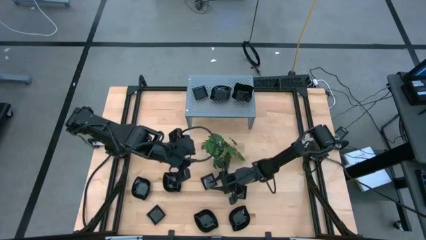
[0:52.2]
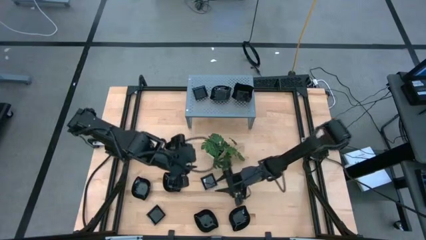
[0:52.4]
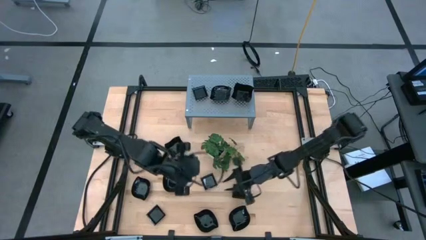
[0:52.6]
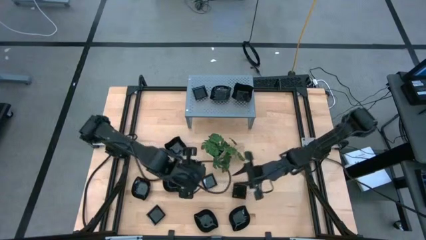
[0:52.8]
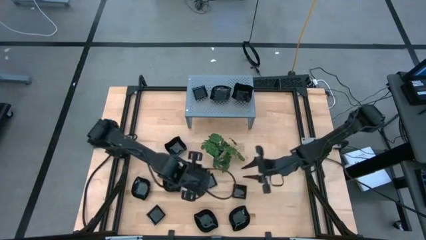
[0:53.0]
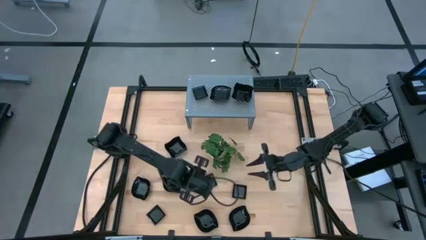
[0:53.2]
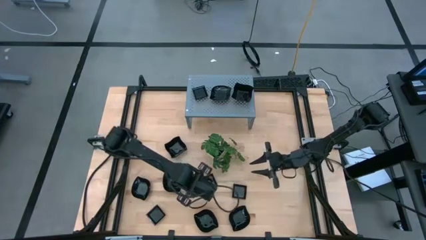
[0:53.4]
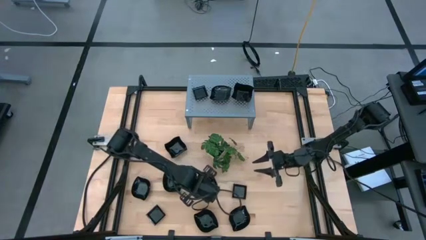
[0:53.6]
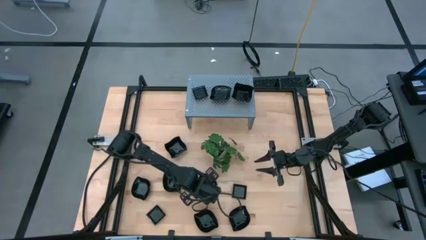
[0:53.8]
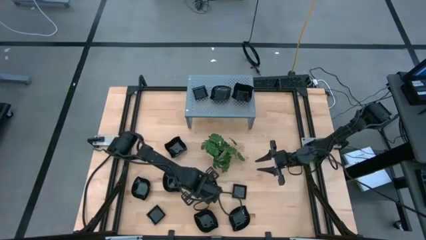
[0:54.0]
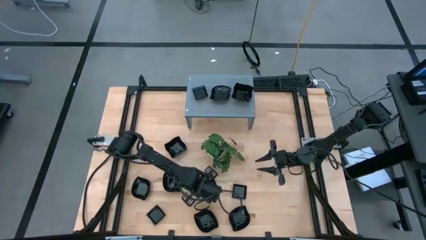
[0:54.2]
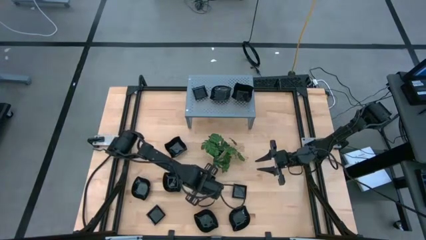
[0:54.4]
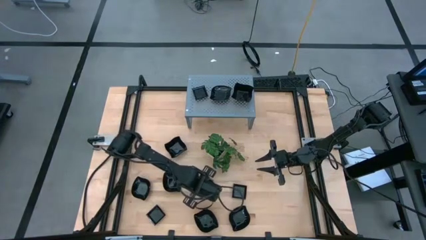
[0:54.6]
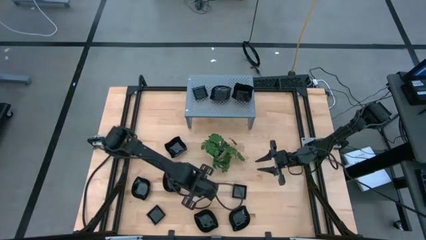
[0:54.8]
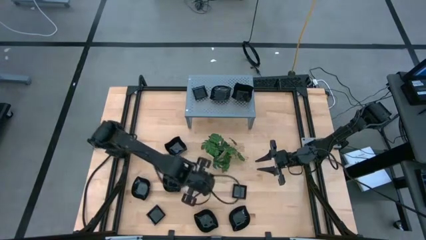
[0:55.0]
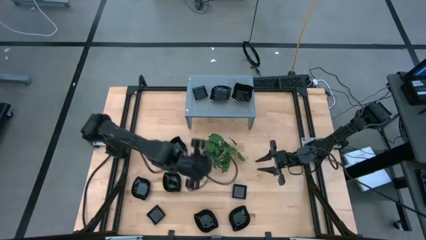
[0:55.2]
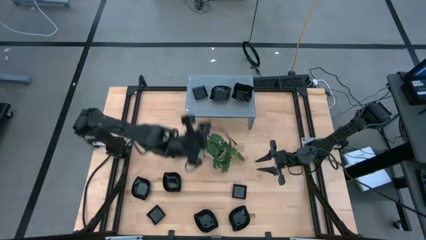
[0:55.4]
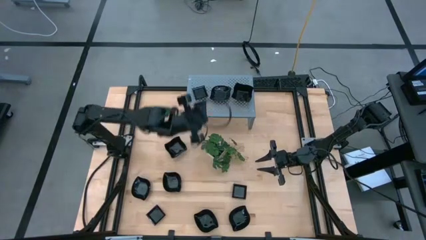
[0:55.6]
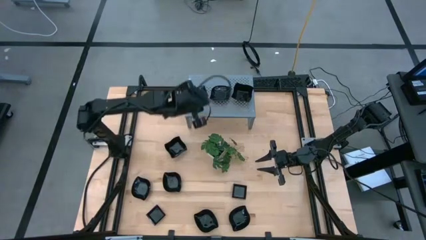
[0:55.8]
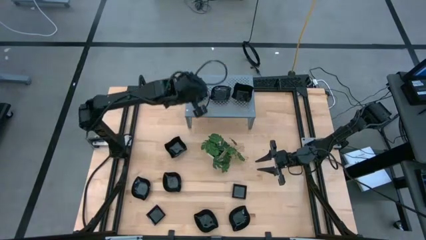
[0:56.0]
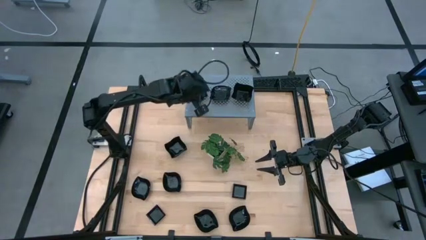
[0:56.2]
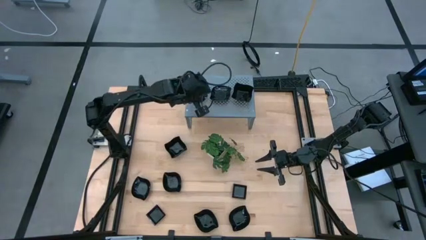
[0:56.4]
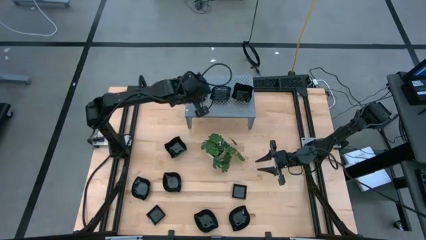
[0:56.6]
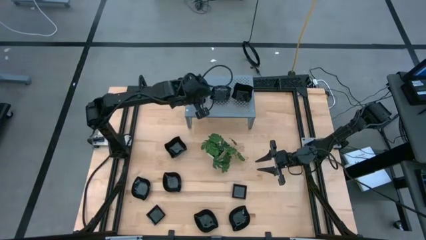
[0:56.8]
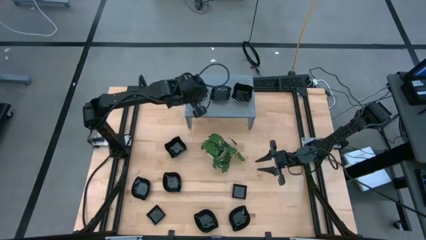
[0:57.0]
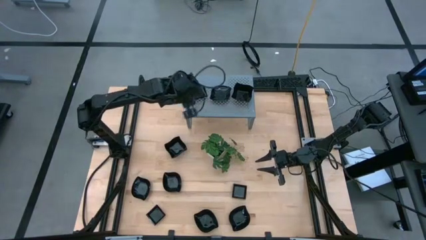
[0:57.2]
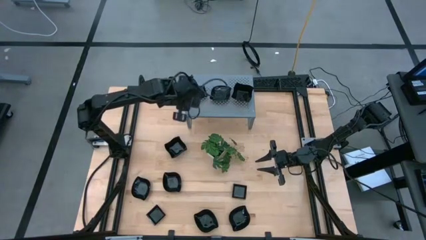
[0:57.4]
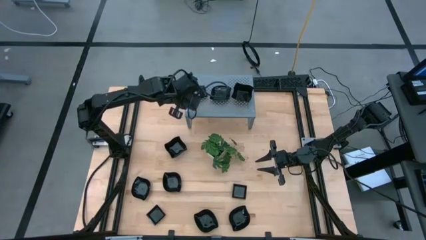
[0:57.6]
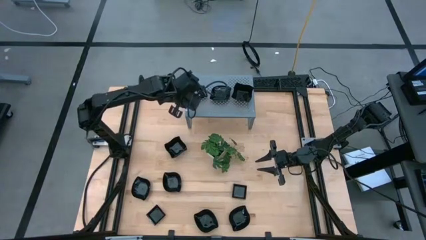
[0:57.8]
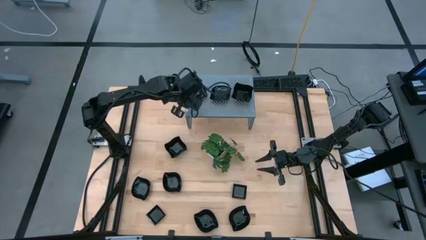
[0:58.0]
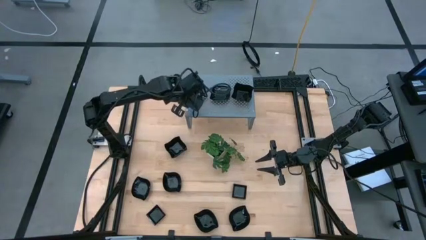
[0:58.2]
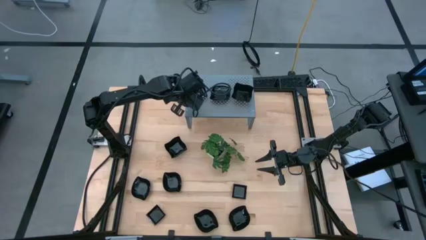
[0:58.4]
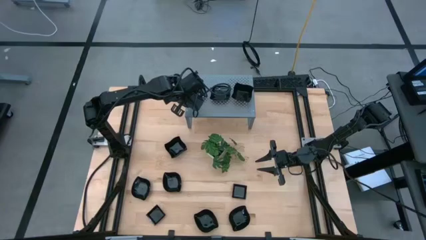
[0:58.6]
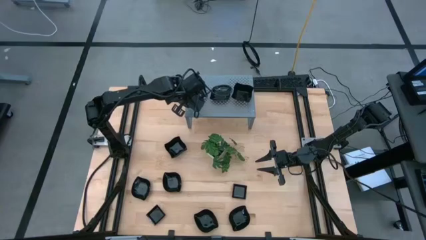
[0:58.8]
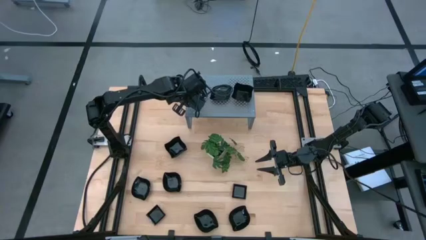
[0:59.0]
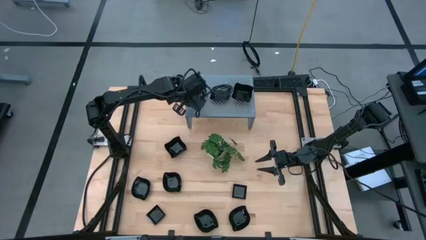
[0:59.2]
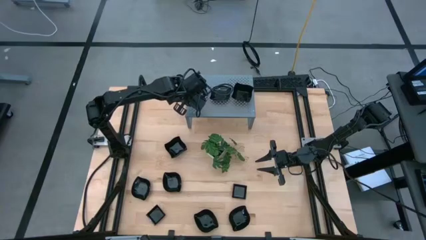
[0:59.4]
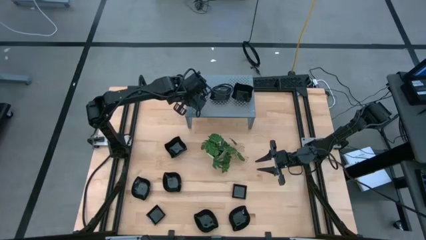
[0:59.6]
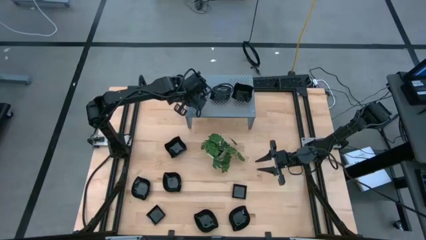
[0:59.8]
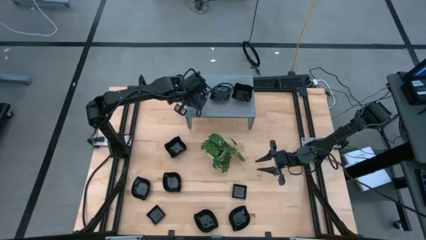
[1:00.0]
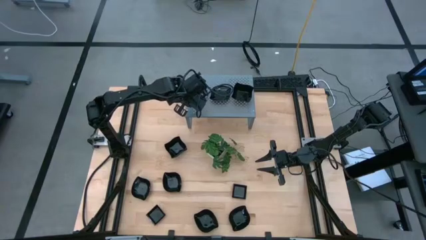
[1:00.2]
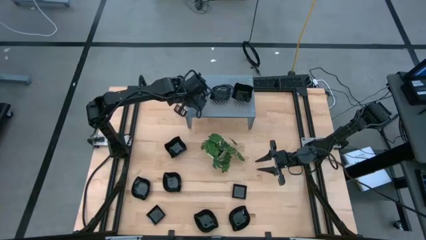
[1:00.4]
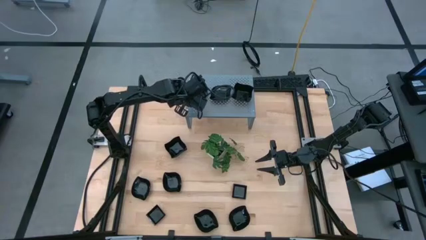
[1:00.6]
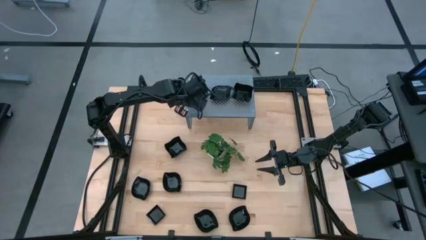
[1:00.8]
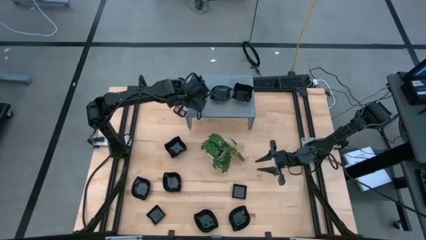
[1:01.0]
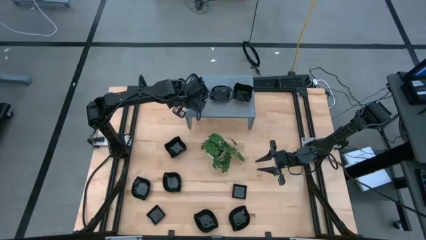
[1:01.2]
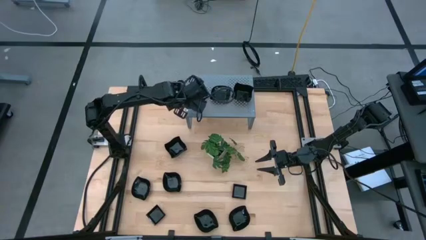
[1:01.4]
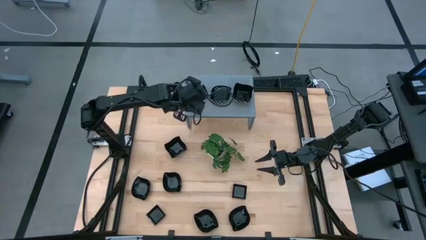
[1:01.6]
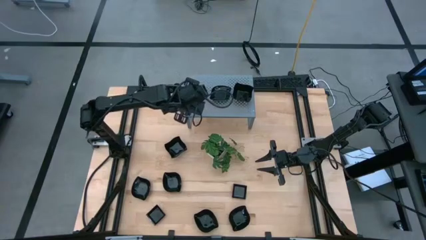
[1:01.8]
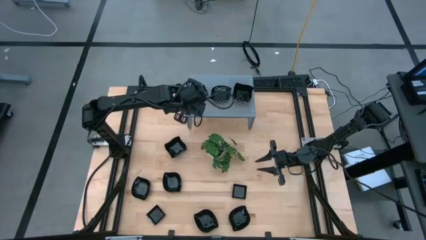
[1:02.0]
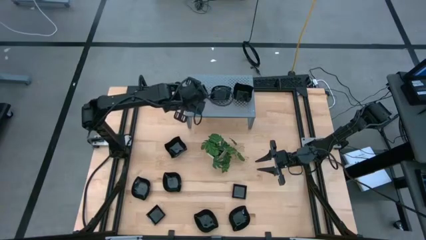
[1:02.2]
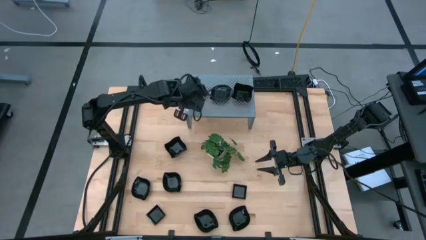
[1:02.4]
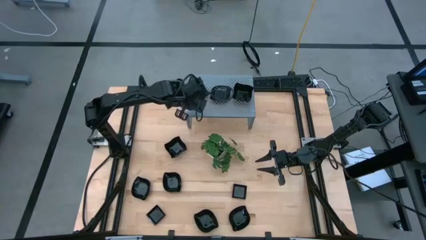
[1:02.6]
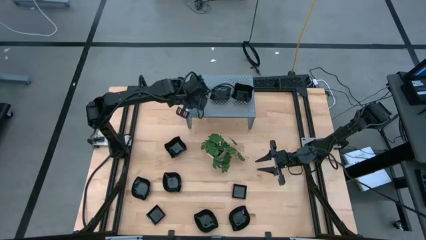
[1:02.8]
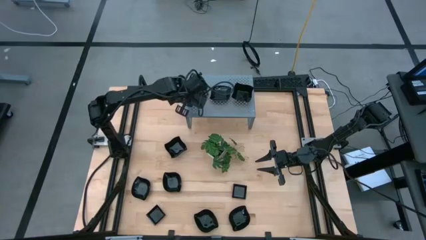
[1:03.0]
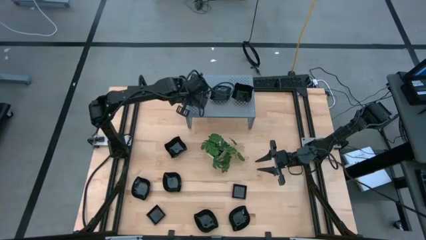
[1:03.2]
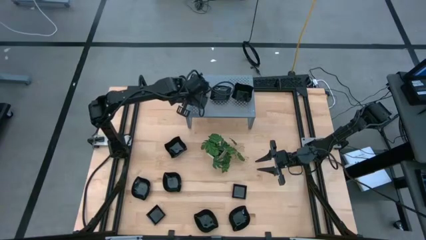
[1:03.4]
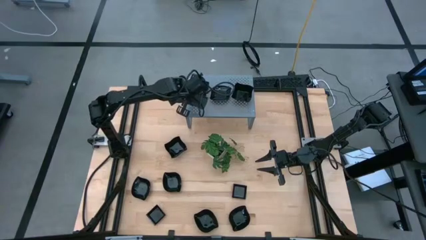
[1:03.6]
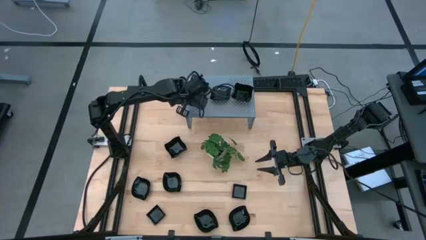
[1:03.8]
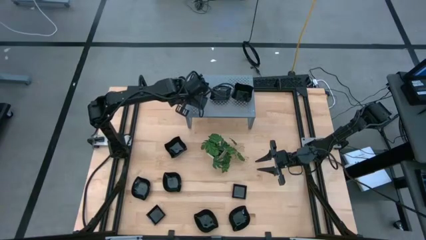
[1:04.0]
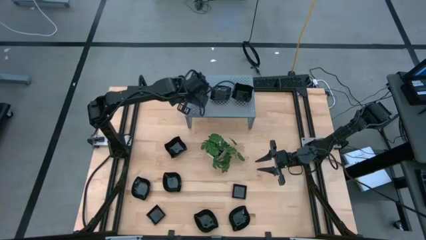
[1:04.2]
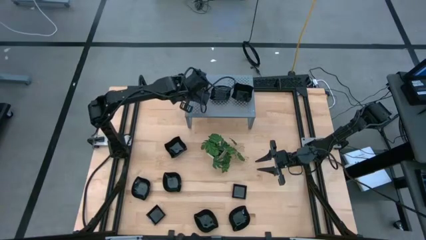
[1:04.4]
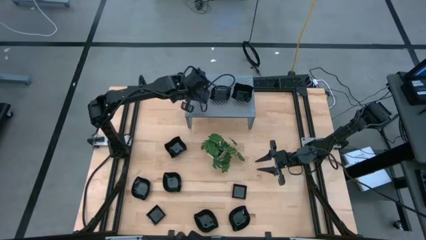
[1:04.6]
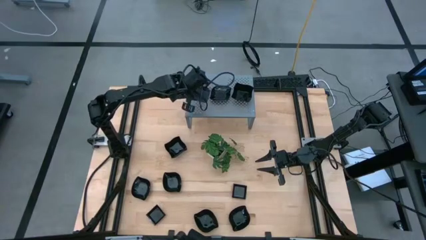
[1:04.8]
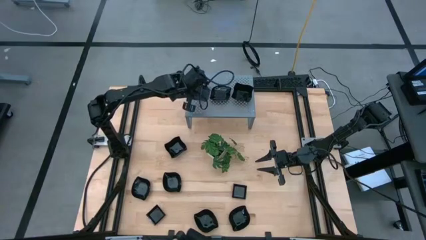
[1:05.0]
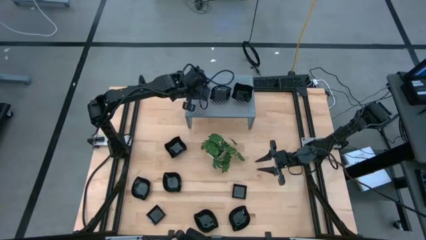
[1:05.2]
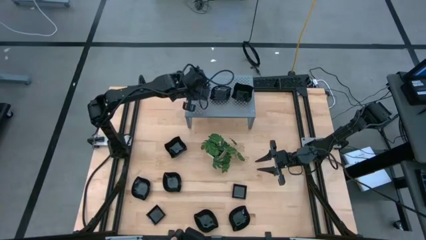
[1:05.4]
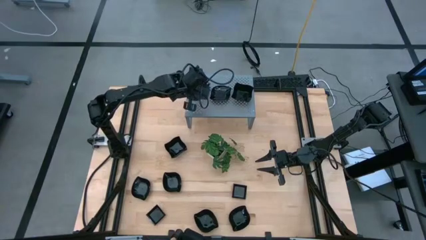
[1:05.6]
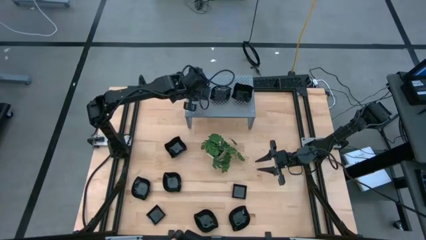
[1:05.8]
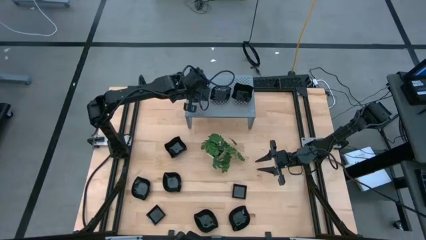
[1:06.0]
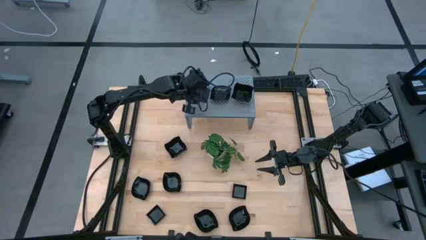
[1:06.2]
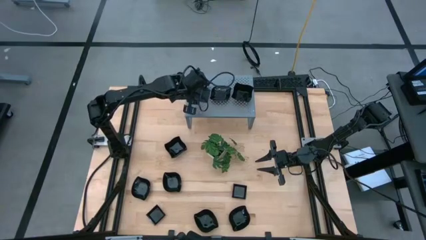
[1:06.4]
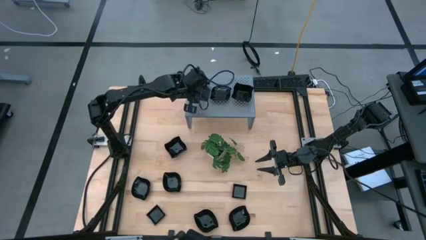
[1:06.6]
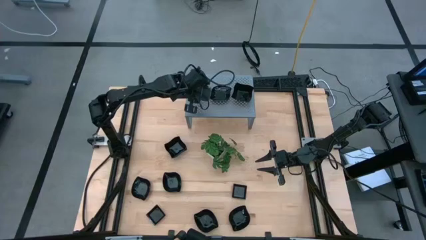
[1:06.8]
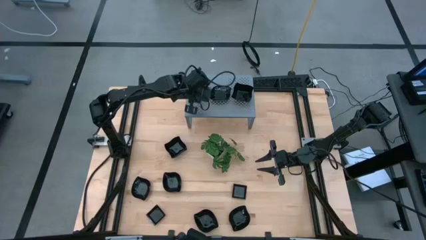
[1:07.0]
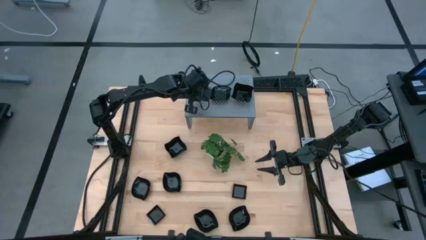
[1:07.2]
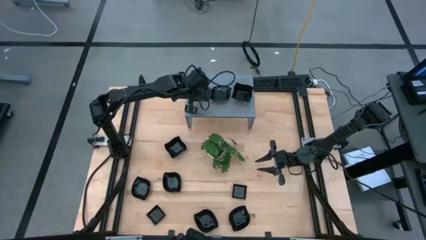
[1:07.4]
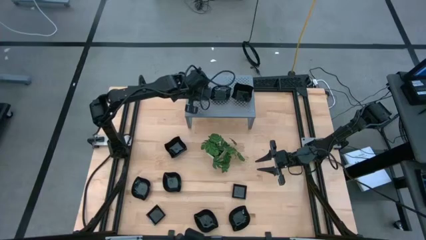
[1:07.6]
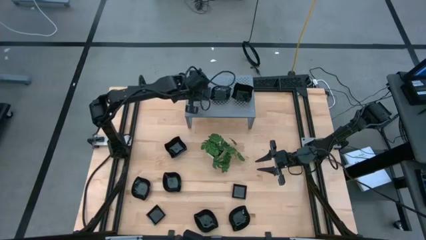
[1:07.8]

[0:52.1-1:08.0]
Task: Pick & Place Mini shaped plates
Stack the square black bowl on top of the other square black bowls on the shelf

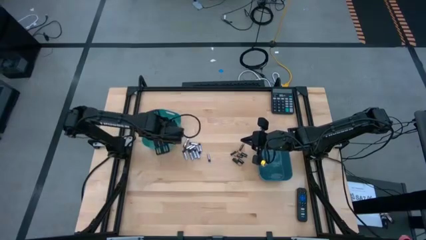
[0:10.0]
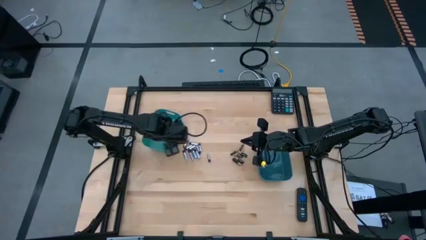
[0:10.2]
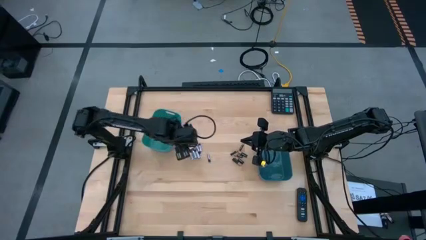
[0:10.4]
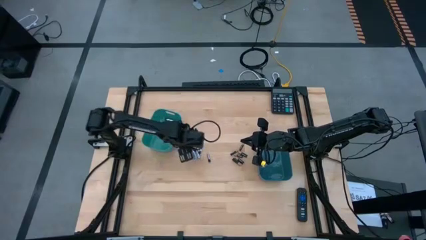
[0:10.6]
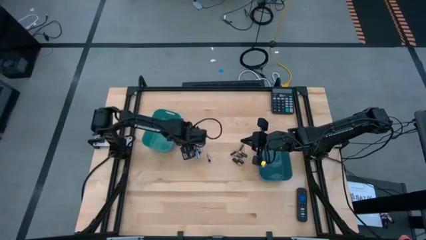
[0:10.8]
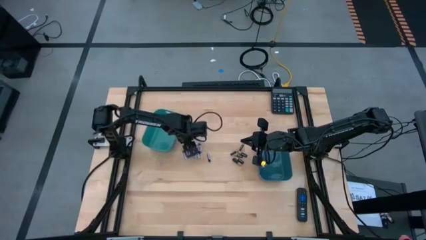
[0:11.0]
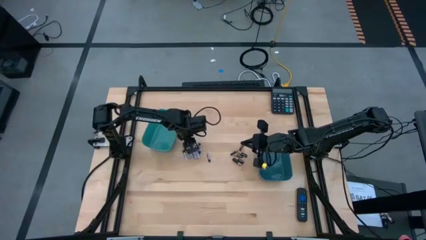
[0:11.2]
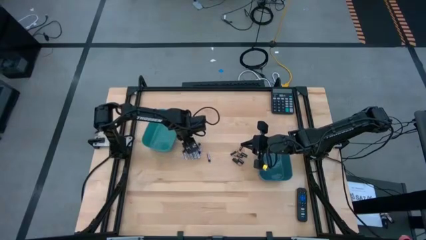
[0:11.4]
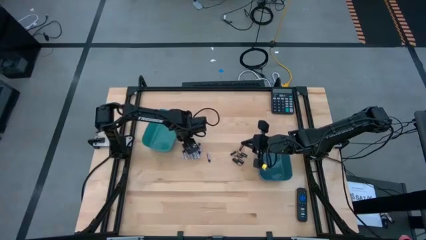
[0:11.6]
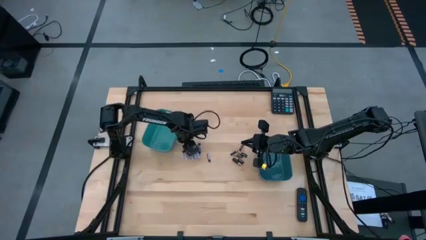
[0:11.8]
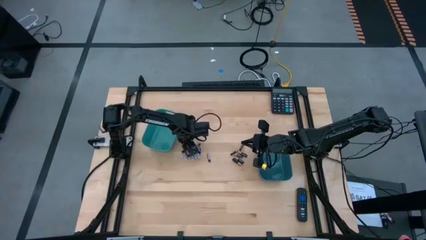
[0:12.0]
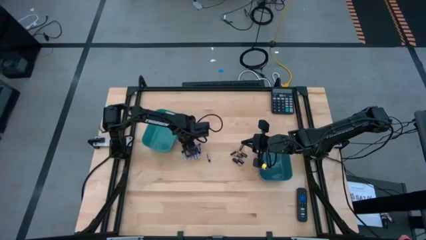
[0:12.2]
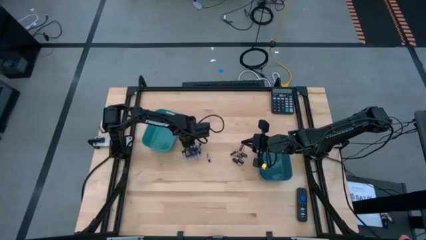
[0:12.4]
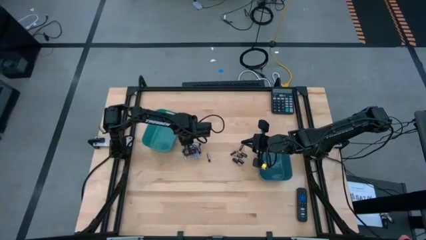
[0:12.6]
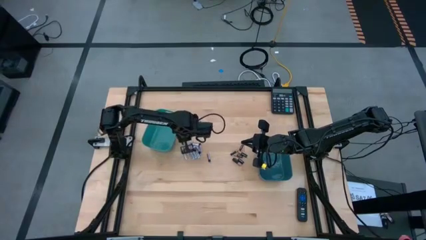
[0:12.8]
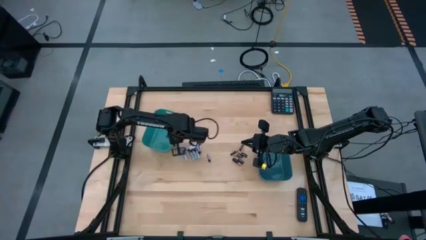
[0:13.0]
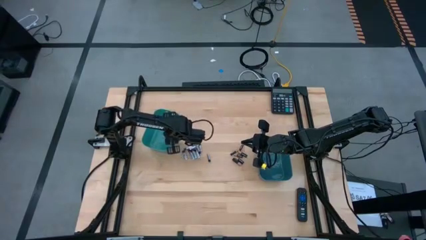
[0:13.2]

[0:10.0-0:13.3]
Task: Sort batteries
Put the silver battery into the green bin
